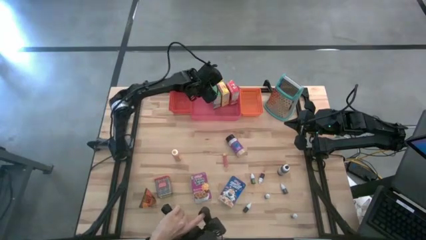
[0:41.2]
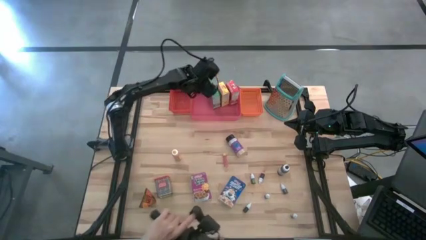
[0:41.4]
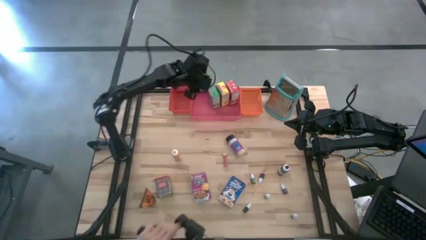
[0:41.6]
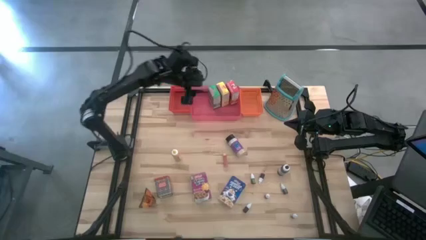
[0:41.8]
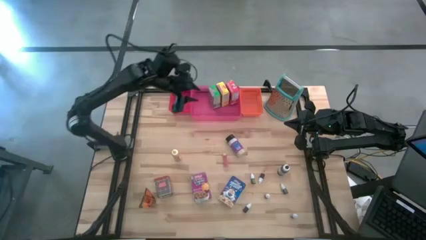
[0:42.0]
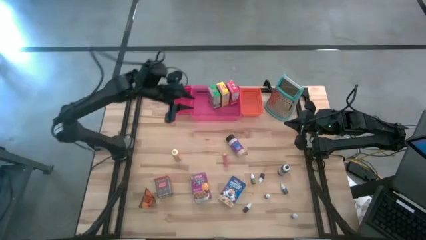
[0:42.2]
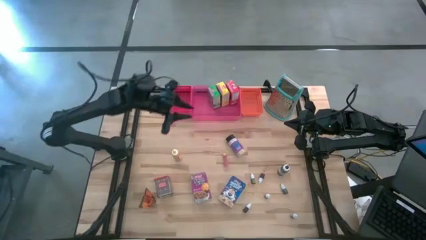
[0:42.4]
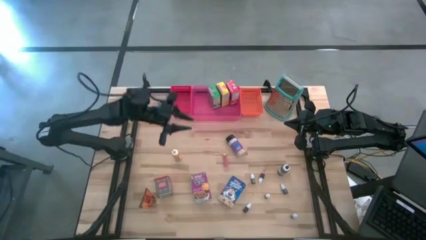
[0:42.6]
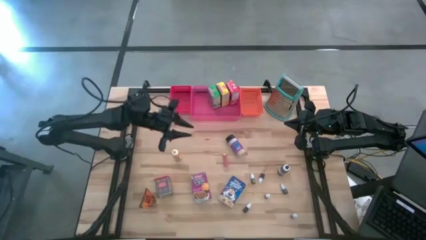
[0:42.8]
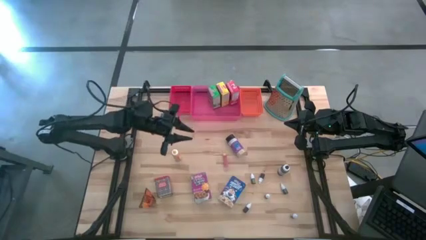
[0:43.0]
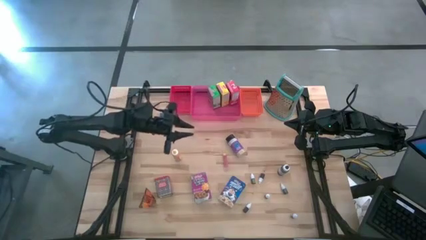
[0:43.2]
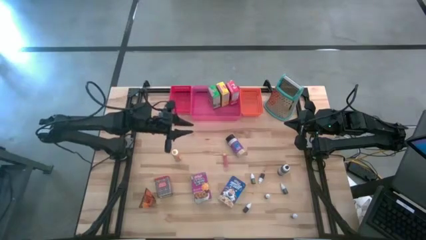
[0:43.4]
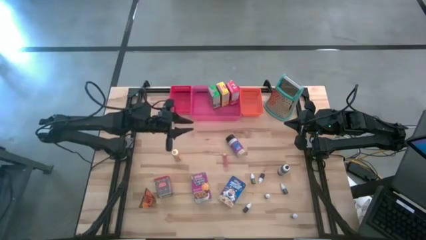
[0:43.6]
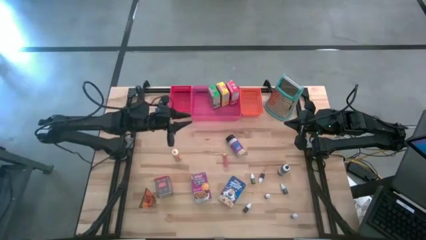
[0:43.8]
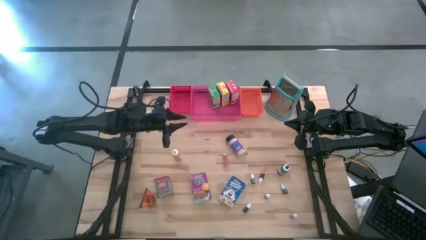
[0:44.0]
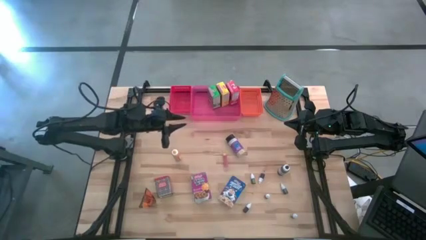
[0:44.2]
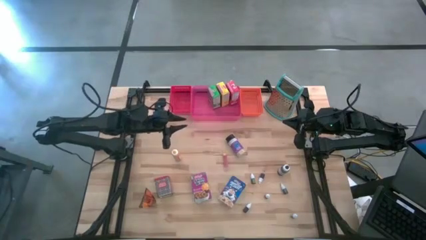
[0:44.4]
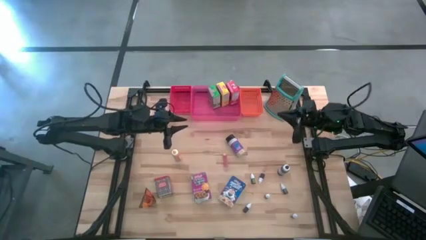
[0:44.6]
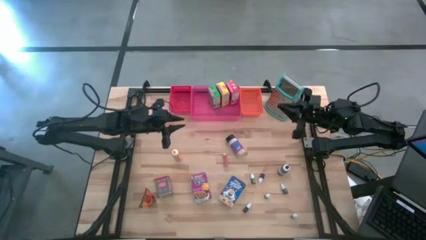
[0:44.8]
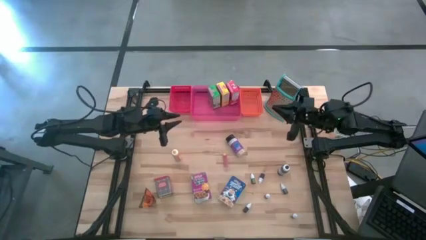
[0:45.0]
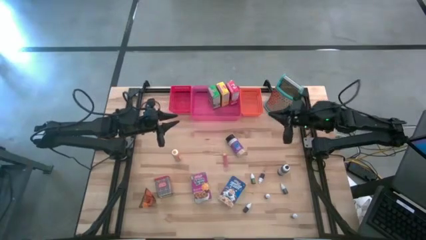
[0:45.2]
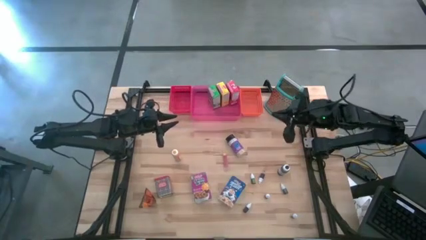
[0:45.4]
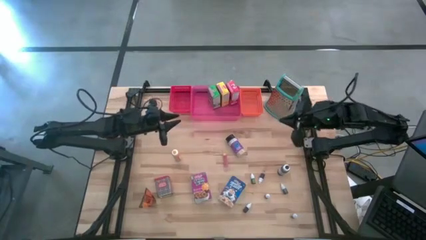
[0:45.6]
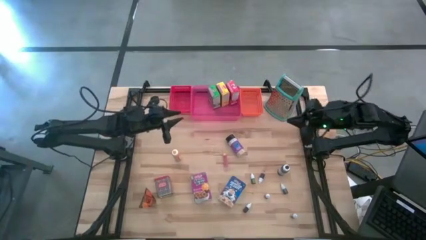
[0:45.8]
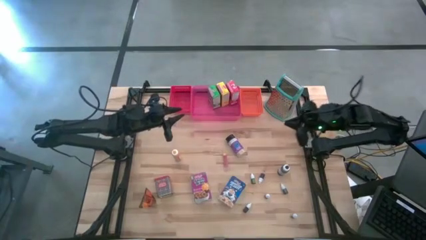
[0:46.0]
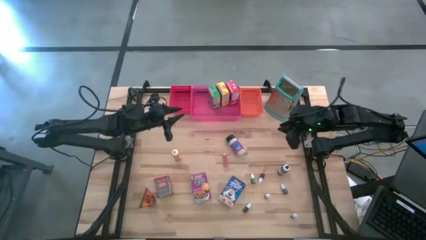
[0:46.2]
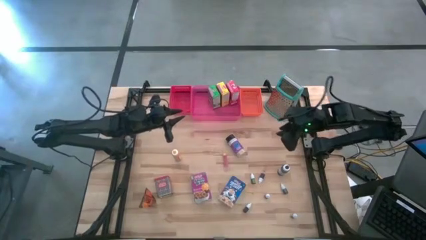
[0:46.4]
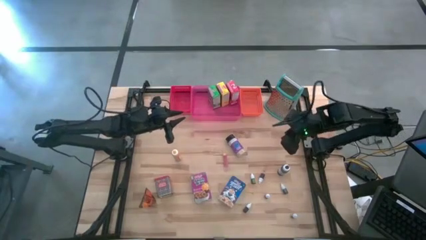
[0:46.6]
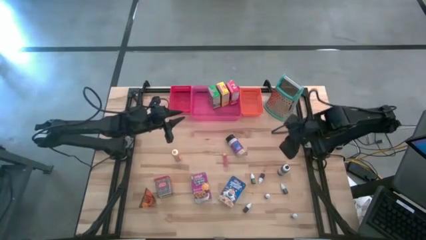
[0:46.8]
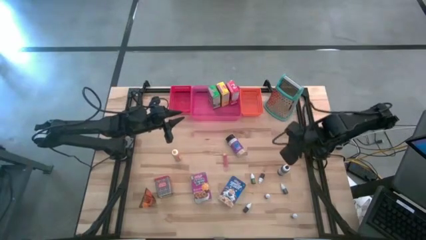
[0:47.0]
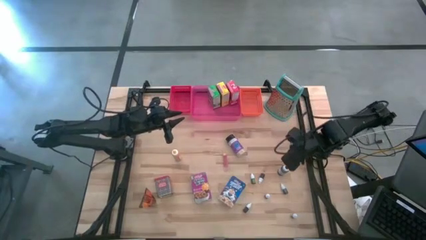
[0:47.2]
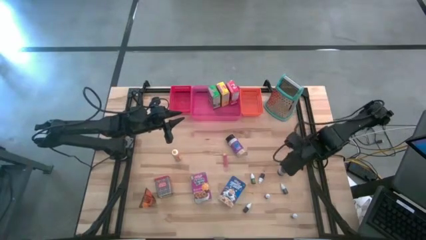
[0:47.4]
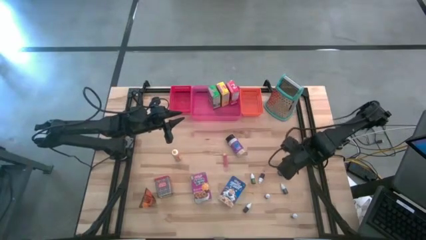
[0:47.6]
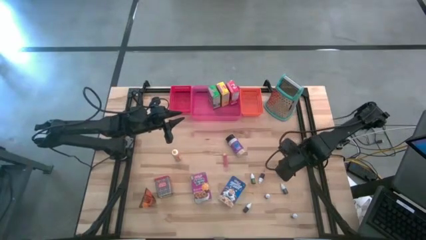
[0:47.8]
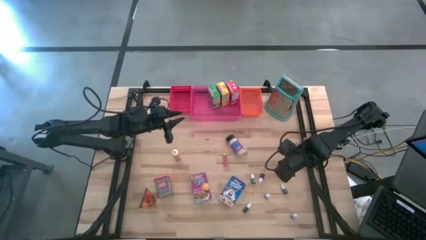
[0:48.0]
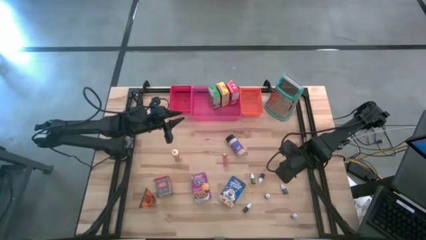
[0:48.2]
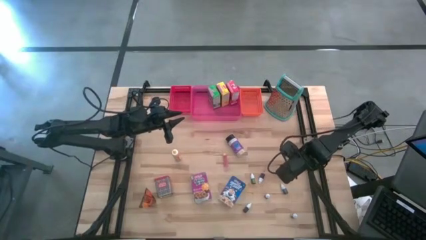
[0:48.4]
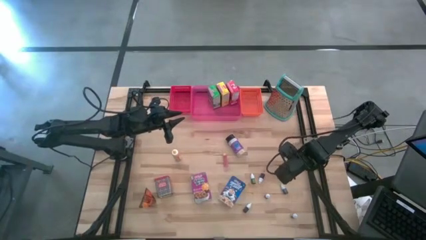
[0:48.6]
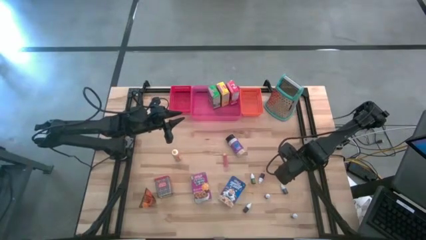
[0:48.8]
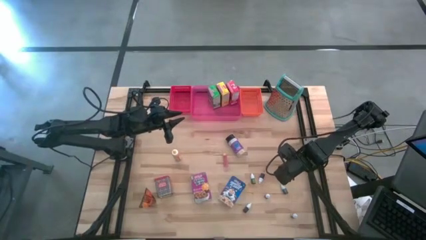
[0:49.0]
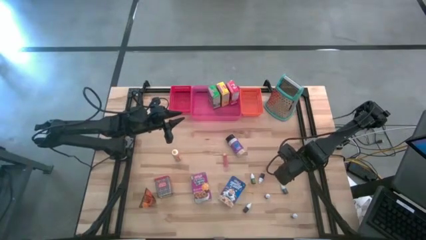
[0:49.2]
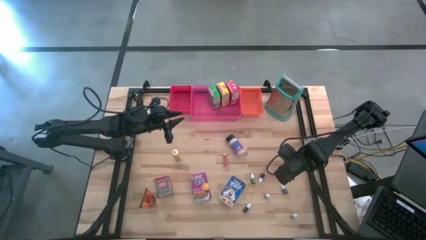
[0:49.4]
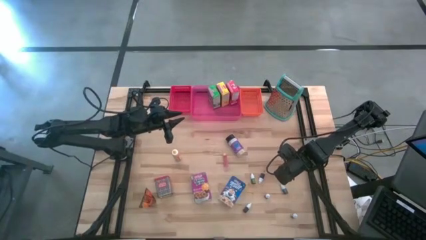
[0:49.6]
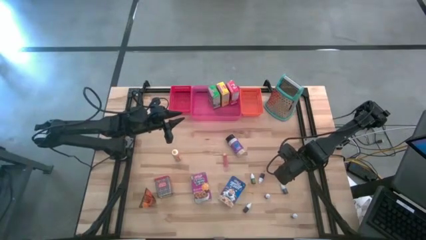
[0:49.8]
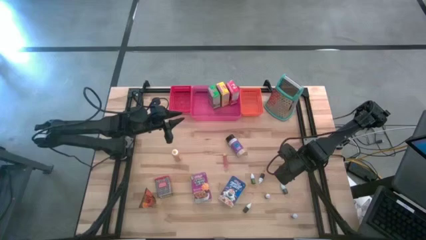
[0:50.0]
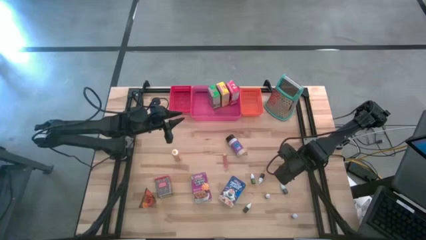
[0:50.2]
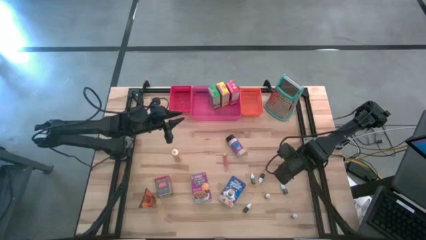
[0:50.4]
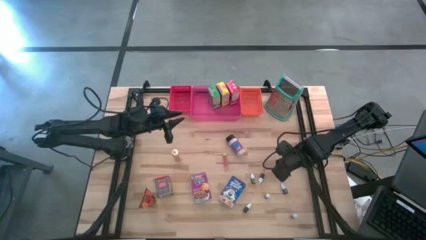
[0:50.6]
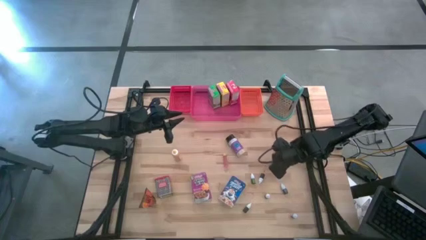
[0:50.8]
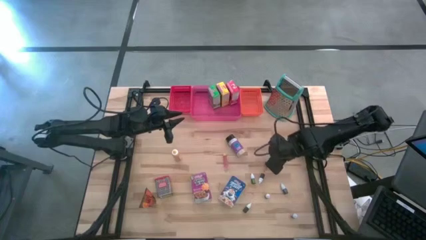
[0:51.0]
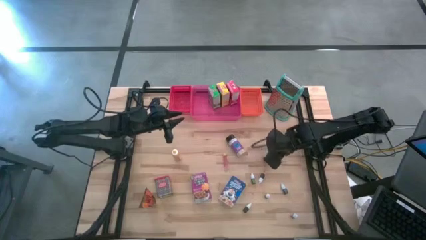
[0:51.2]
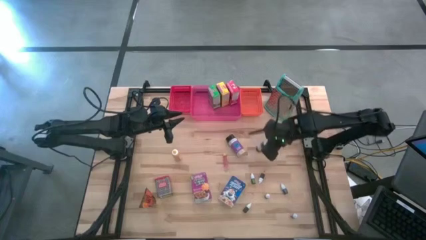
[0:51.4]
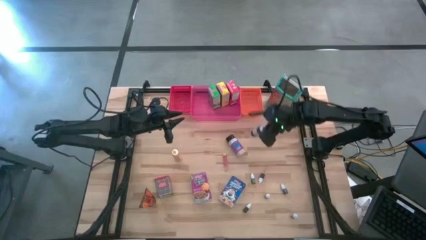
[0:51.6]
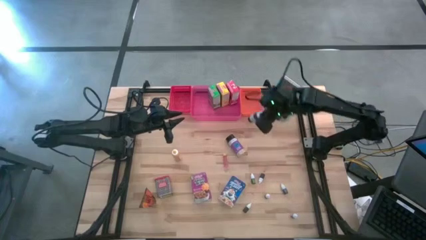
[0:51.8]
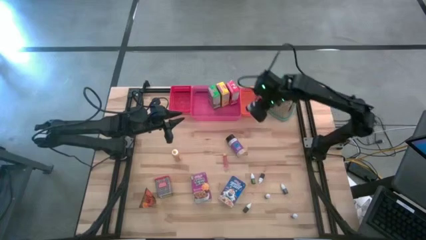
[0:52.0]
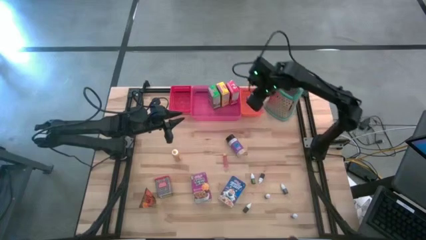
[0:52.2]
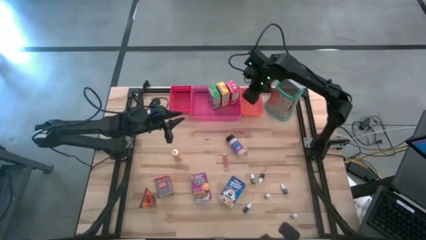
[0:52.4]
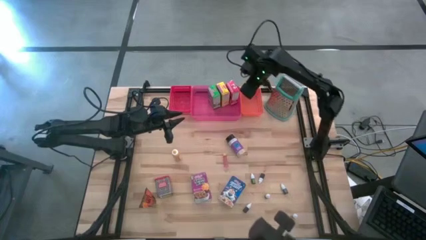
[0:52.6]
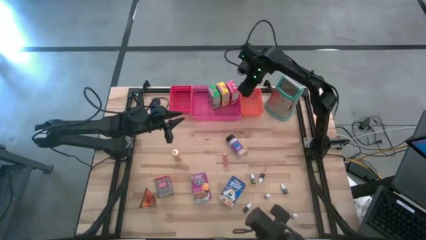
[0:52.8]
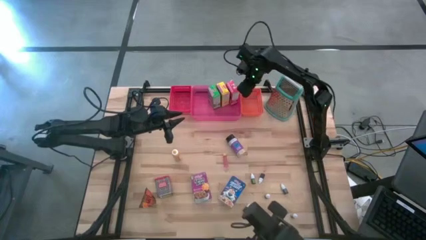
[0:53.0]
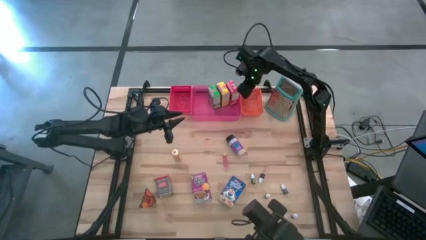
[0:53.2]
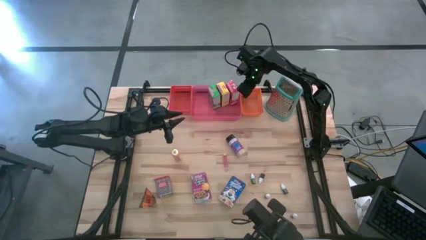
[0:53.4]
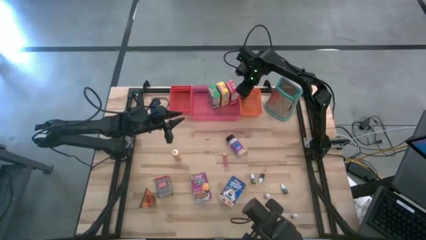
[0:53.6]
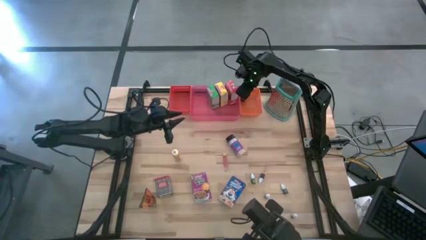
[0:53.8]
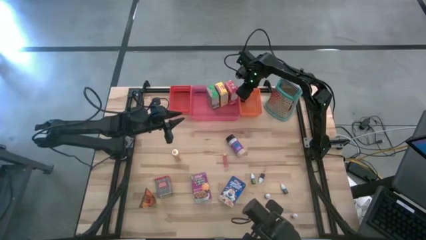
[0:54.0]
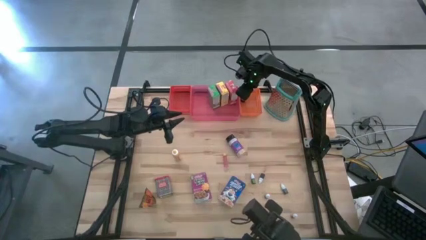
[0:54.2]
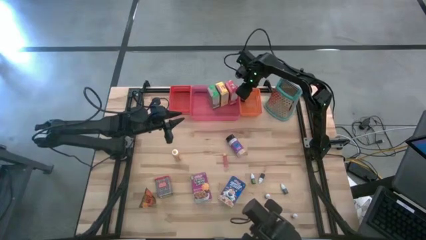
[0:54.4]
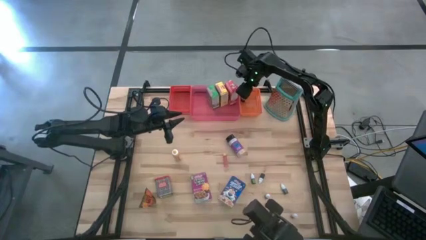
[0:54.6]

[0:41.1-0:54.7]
Task: Pick & Place Kitchen Items
Put the large black food coloring bottle into the orange bin
